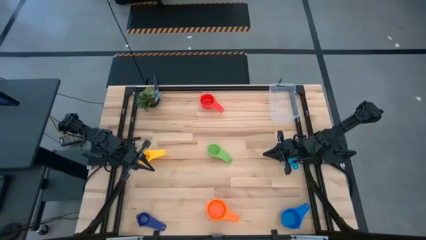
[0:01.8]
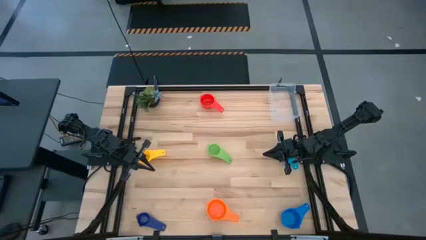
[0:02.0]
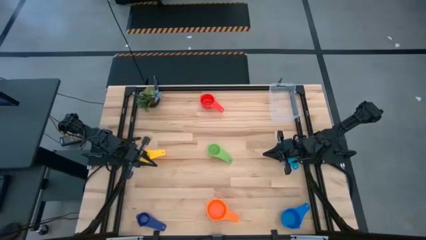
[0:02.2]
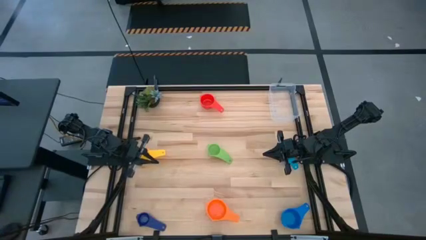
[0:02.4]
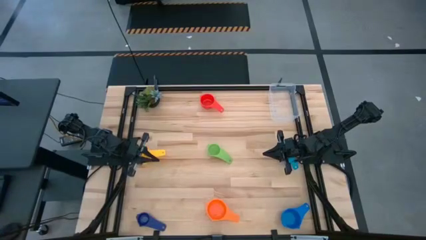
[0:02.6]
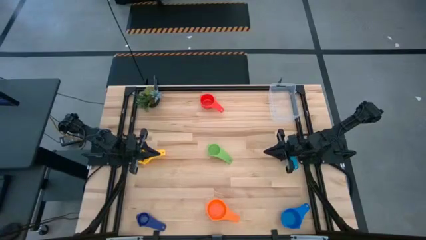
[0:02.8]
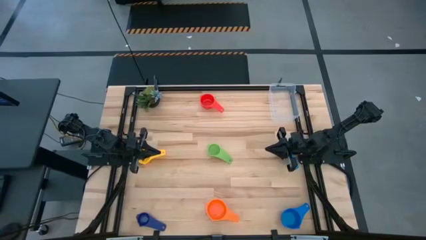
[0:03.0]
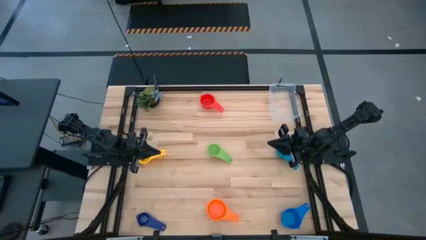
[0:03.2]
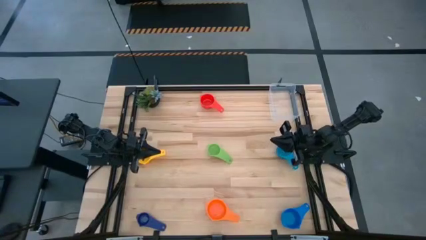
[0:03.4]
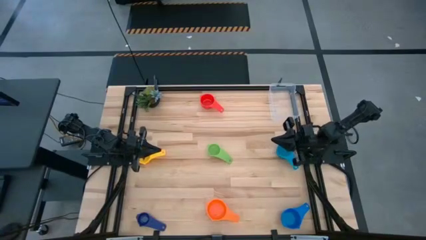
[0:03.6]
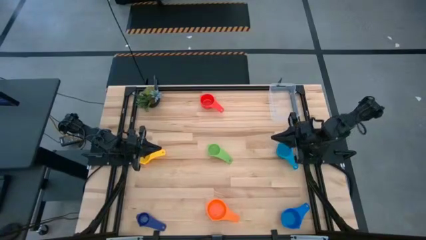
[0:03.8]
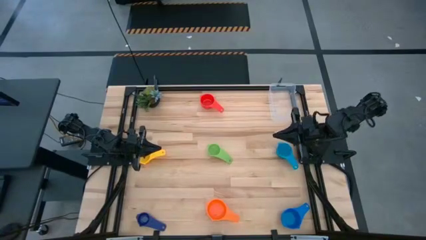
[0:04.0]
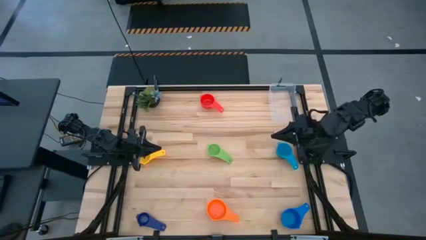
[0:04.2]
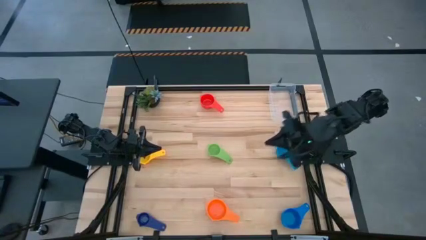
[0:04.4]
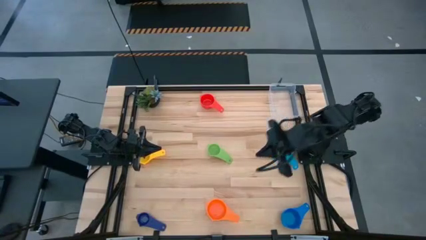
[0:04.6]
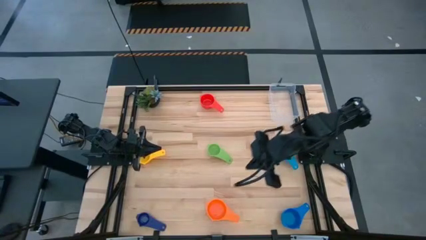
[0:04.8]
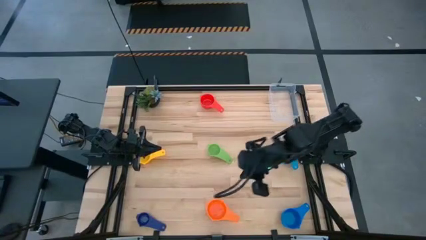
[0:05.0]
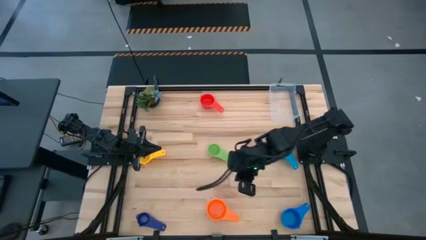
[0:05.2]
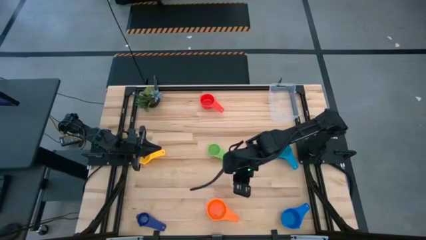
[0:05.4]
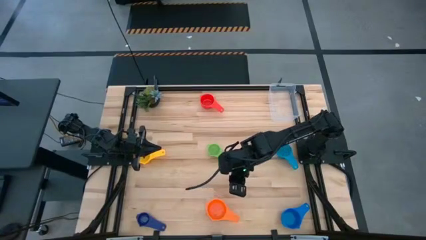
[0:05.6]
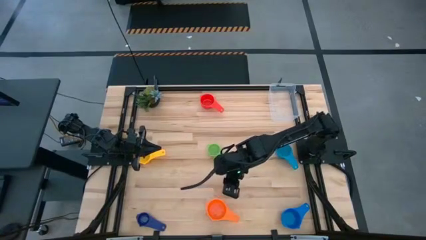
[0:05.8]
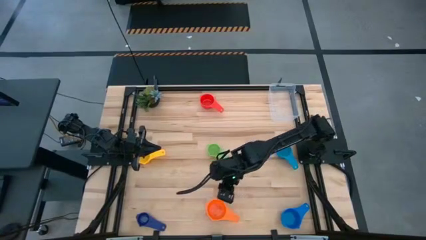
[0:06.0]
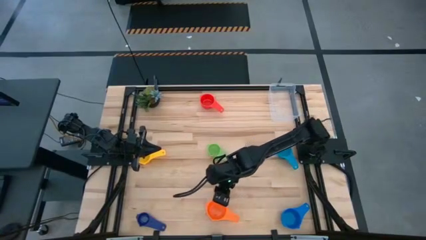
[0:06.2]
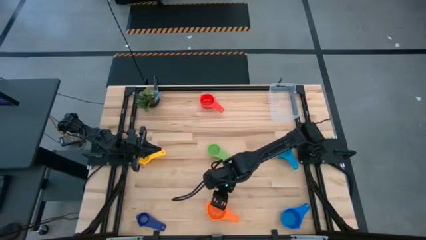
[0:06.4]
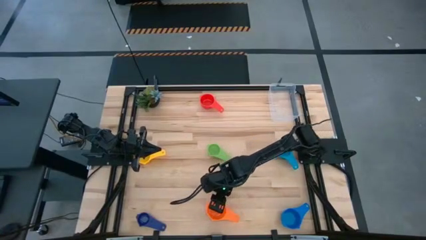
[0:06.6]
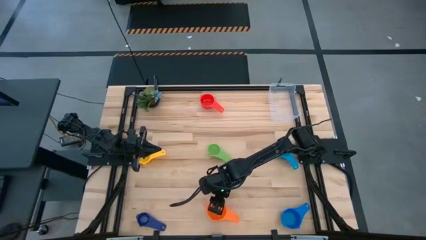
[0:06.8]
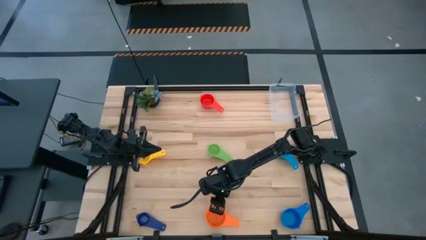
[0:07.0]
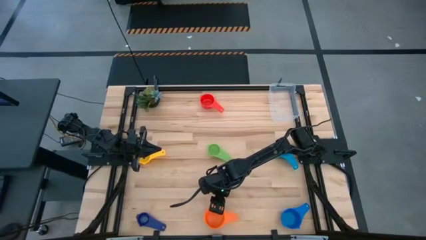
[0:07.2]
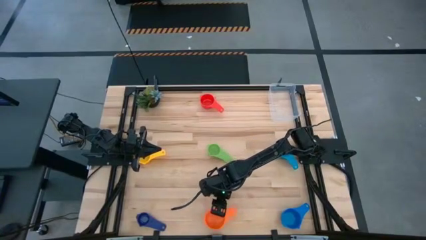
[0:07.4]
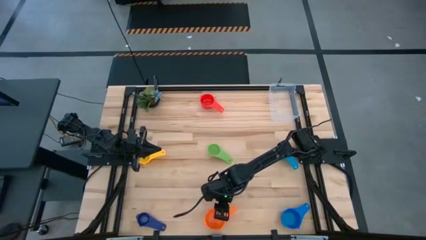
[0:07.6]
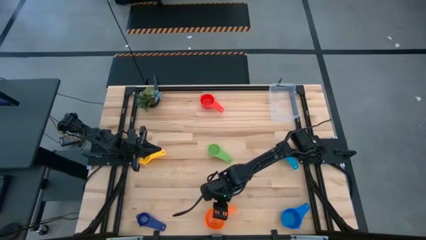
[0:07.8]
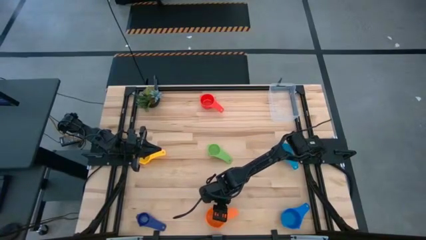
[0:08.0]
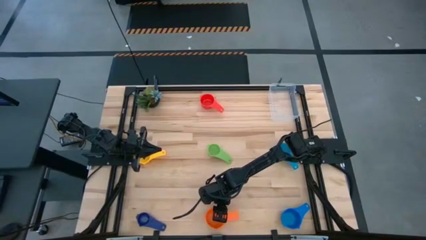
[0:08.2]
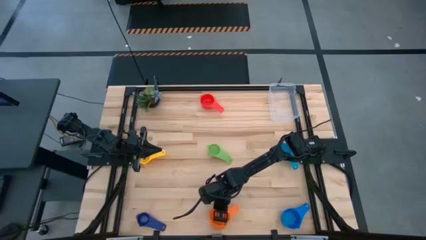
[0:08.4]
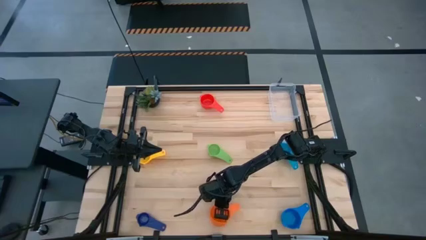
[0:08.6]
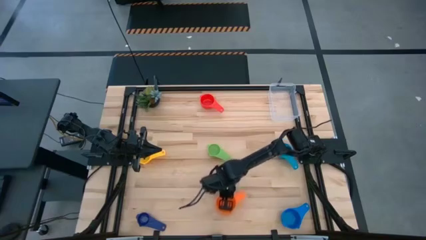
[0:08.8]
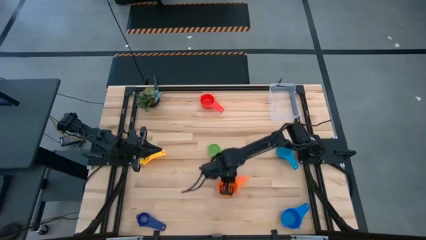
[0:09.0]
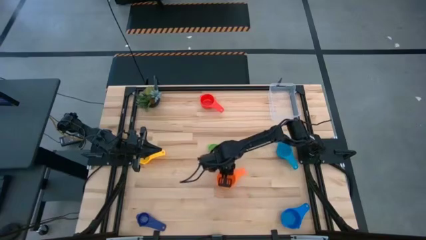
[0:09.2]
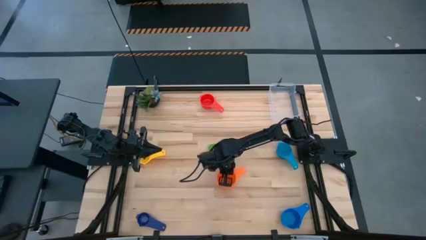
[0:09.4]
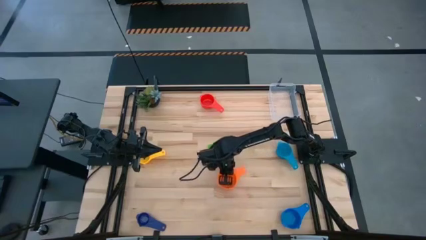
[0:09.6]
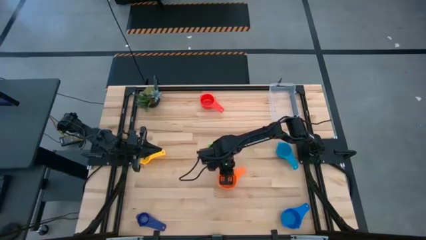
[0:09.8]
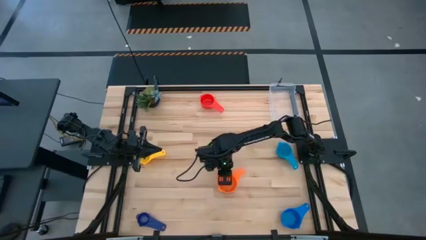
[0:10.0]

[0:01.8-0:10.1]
Task: Nest measuring cups in basket
Move the orange measuring cup to the center of the table

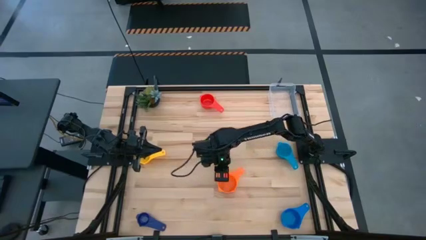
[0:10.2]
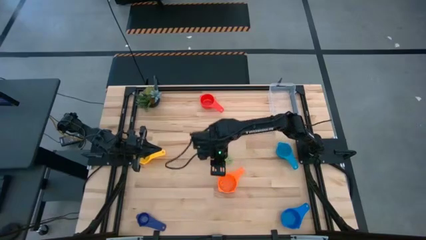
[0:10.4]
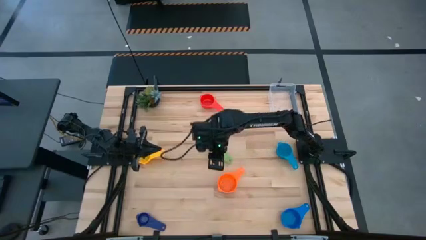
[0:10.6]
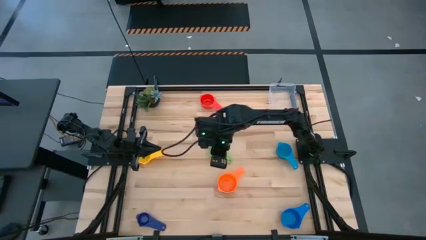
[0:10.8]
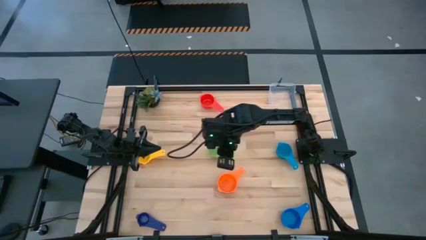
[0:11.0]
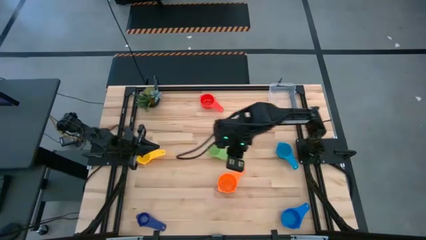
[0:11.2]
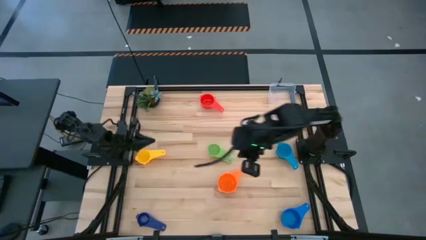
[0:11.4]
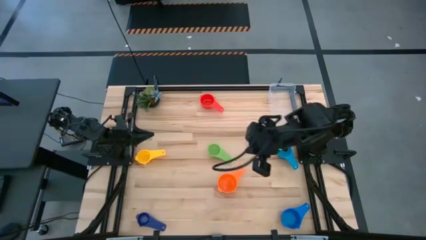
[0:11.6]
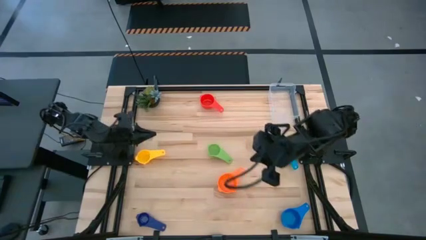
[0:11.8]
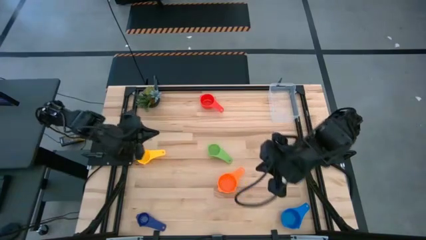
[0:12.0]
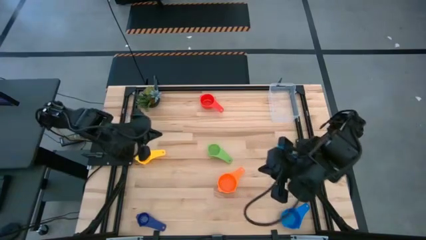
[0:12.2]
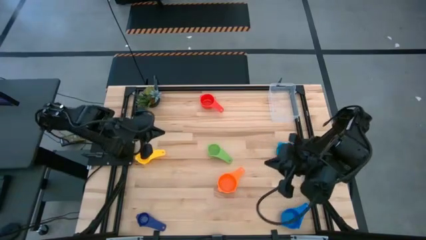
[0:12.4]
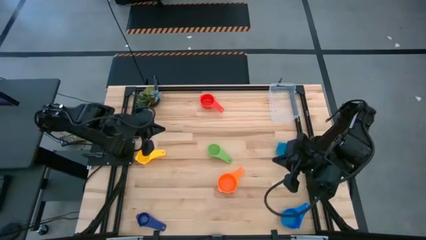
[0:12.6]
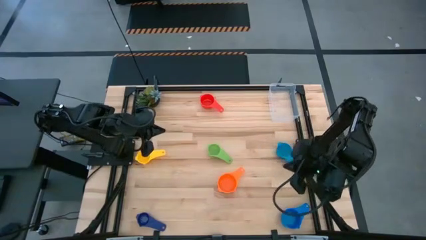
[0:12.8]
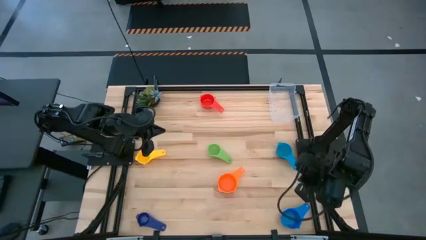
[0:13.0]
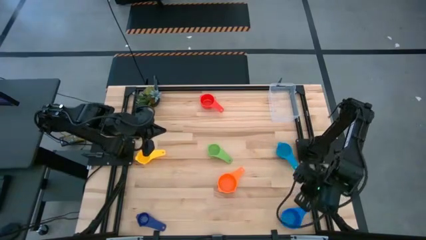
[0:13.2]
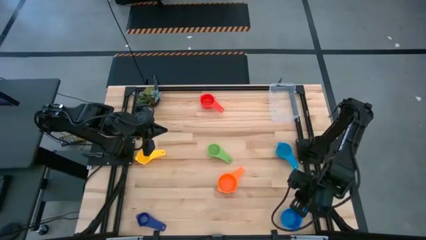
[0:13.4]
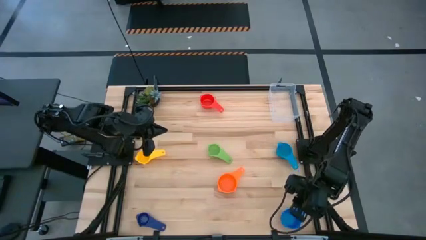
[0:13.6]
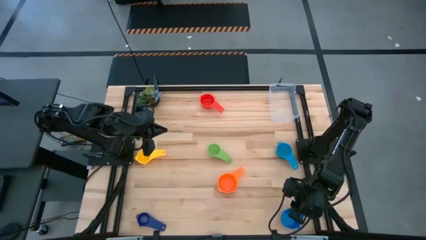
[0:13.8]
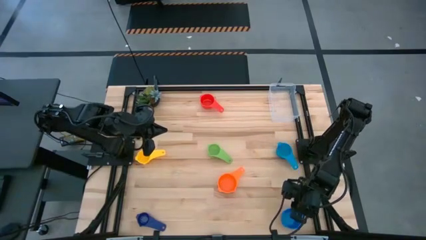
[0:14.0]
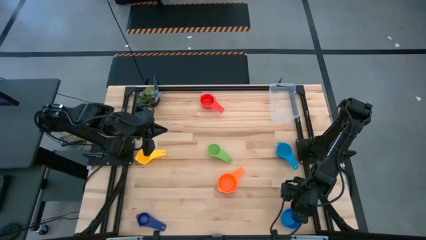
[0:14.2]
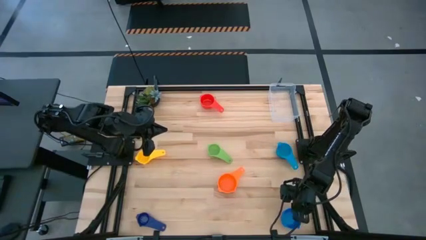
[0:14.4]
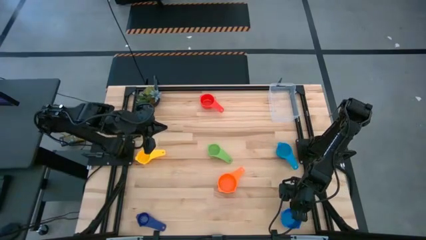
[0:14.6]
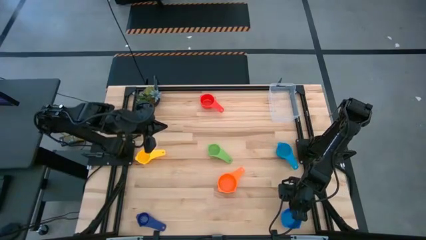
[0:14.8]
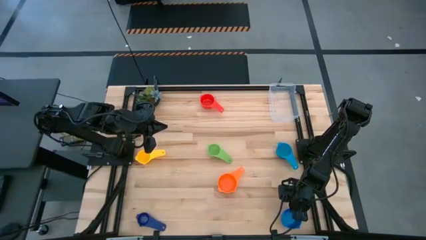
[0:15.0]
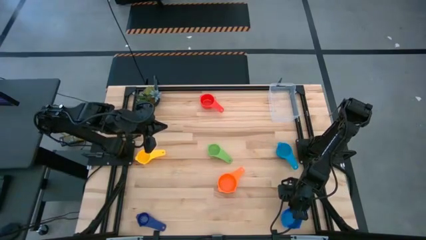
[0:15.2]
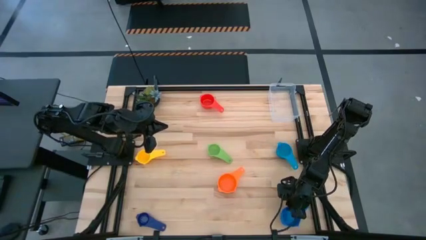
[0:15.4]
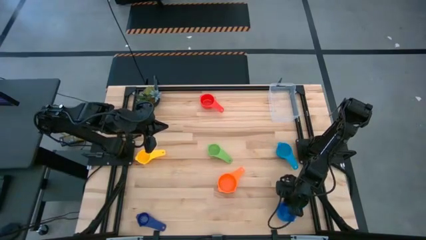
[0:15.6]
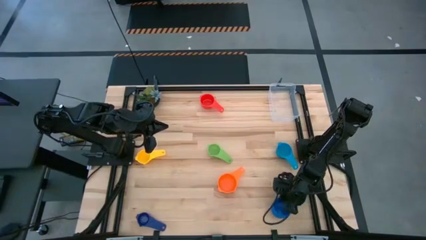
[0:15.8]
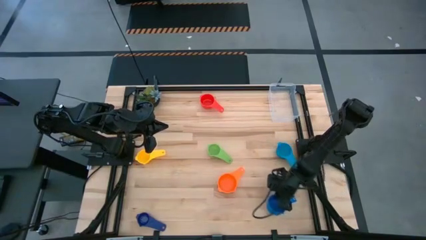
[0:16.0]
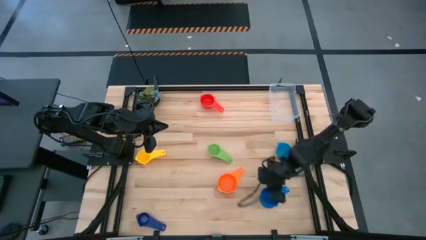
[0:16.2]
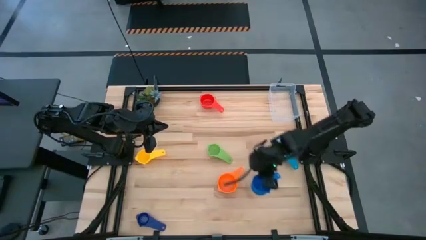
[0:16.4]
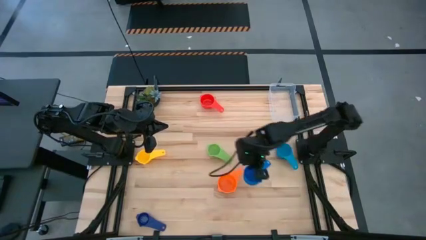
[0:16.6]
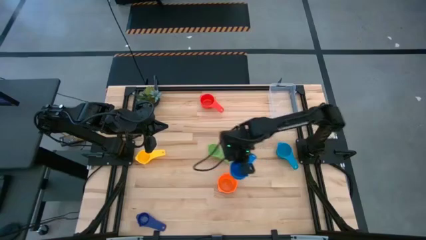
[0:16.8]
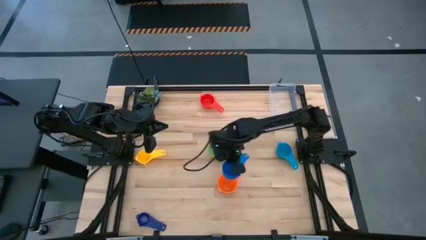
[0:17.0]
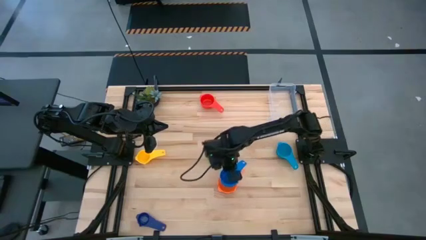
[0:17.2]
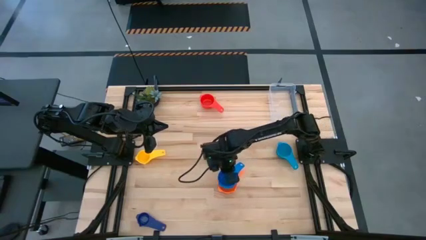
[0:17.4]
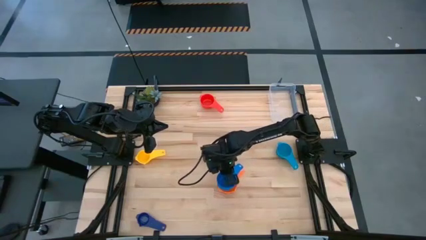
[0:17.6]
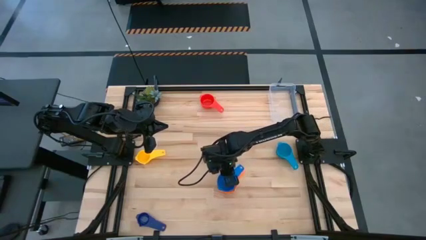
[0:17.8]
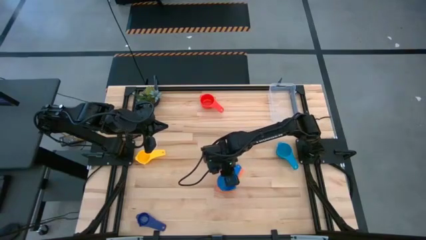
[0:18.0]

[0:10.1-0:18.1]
Stack the light blue measuring cup on top of the orange measuring cup
